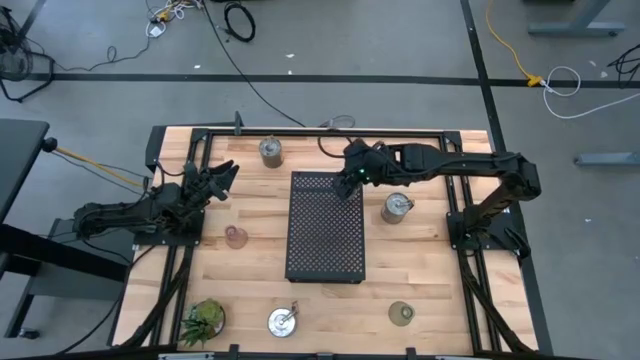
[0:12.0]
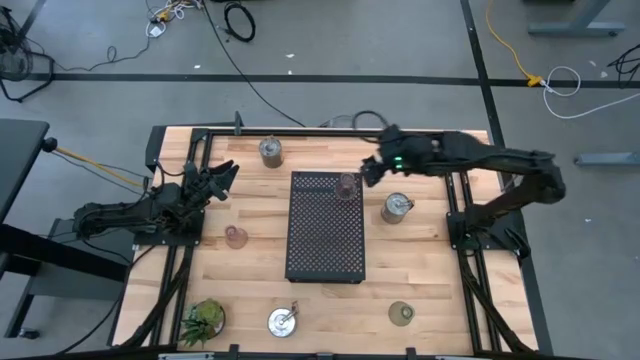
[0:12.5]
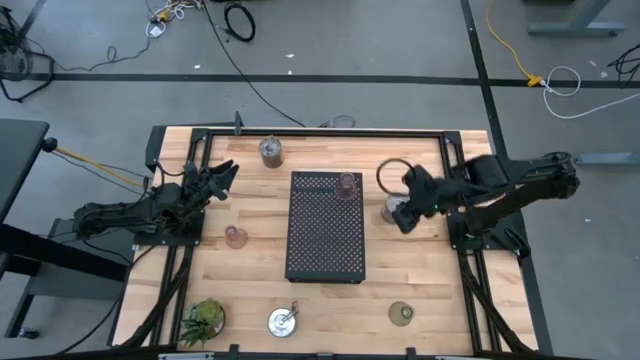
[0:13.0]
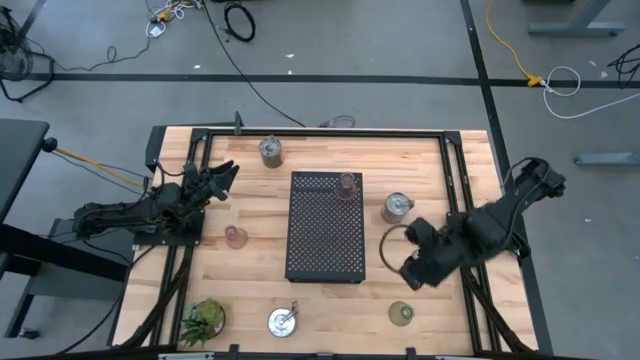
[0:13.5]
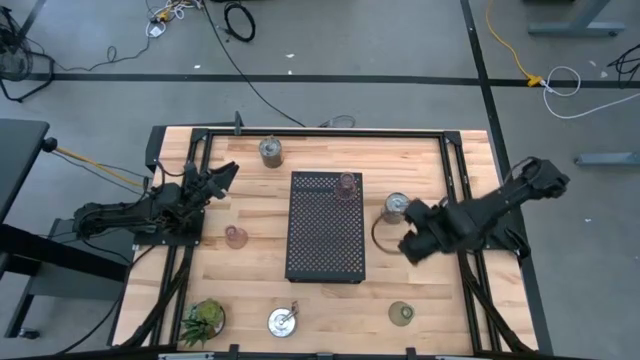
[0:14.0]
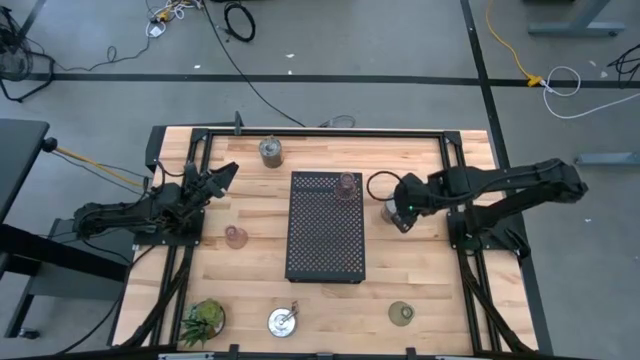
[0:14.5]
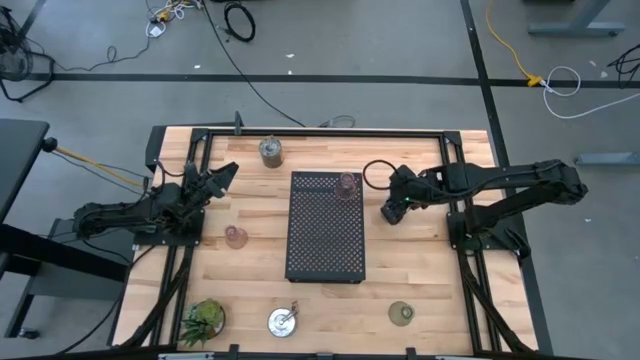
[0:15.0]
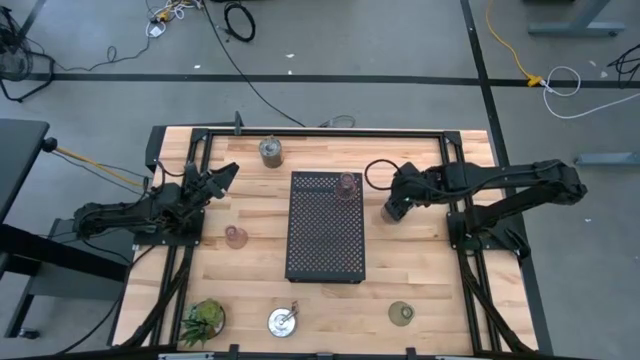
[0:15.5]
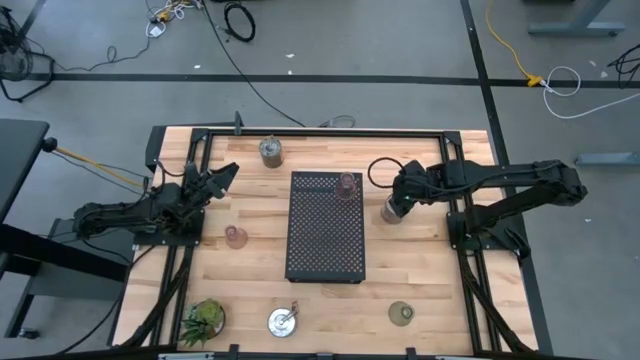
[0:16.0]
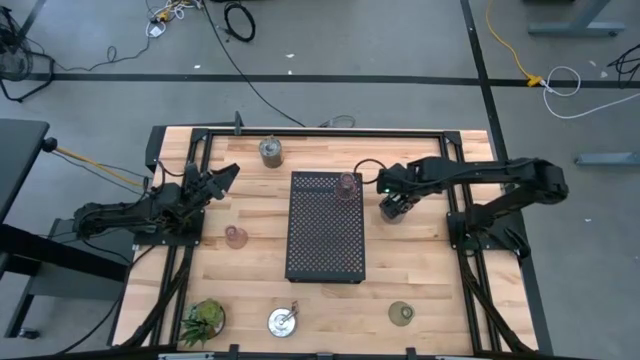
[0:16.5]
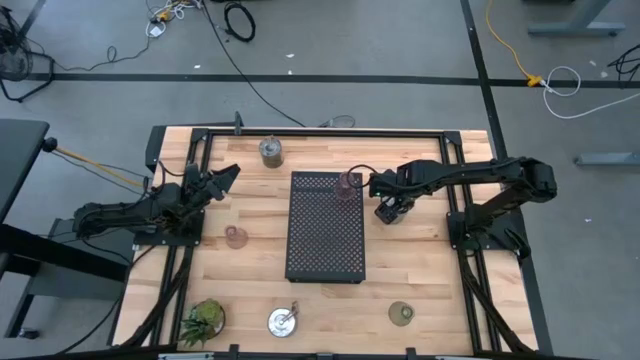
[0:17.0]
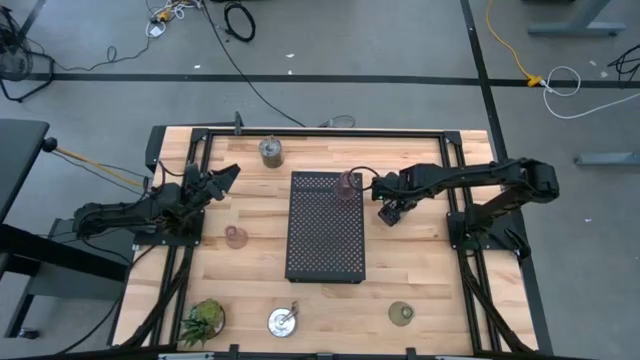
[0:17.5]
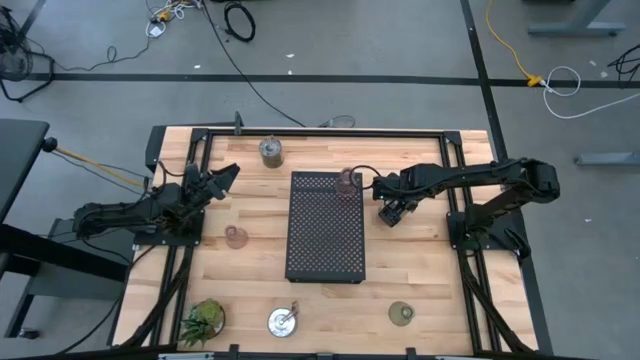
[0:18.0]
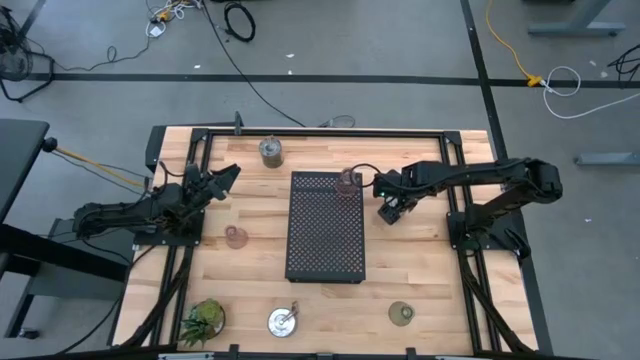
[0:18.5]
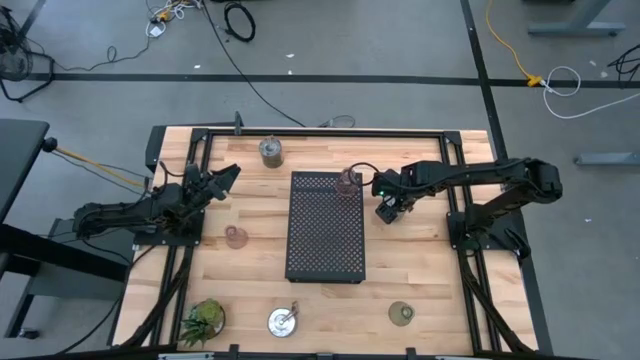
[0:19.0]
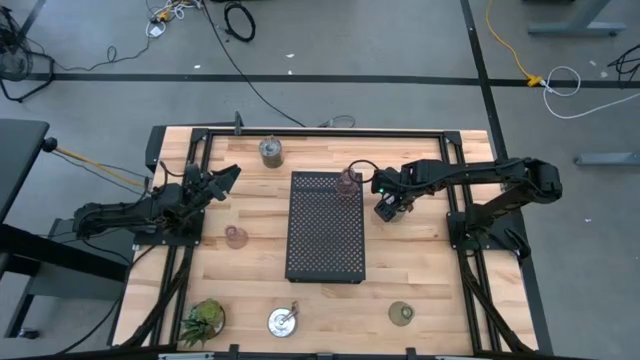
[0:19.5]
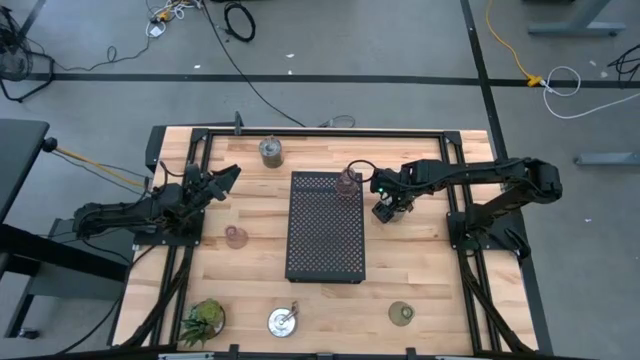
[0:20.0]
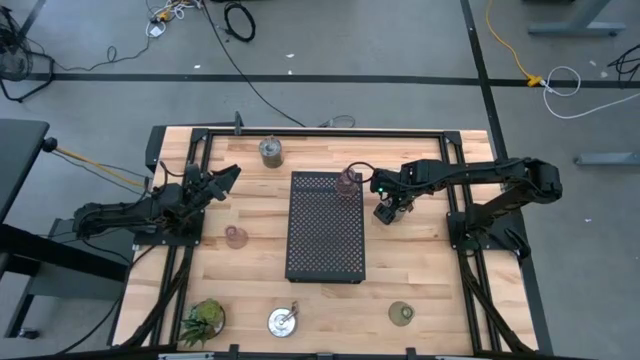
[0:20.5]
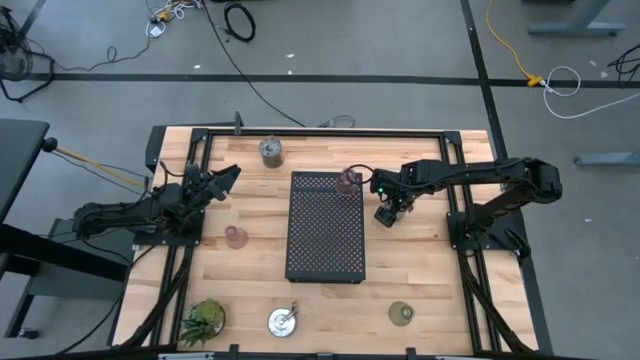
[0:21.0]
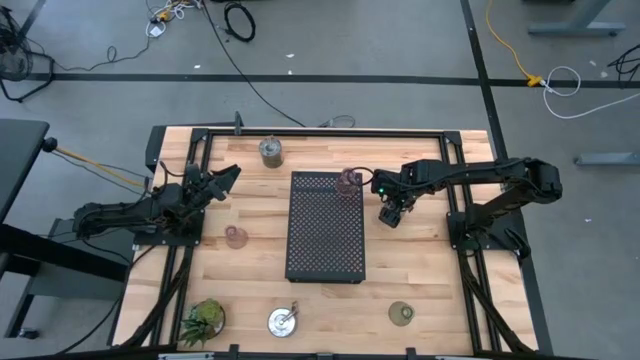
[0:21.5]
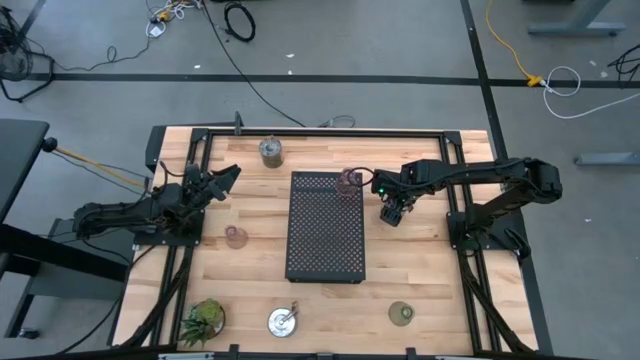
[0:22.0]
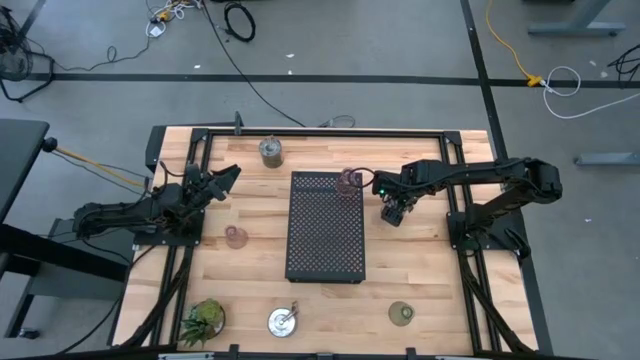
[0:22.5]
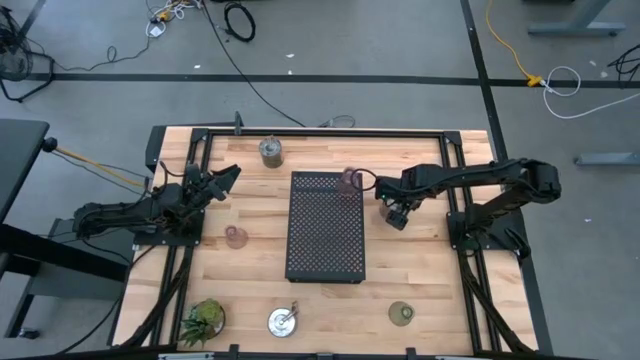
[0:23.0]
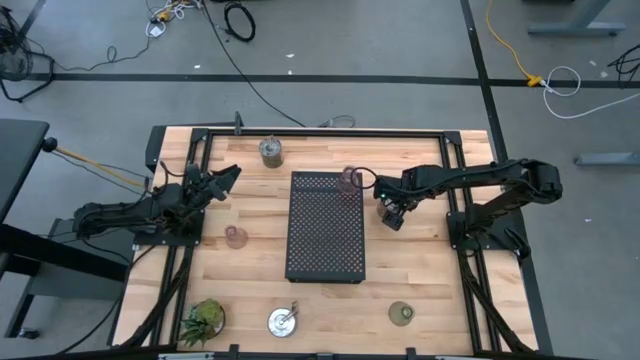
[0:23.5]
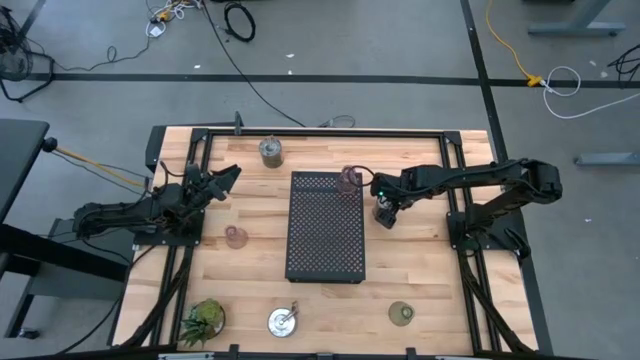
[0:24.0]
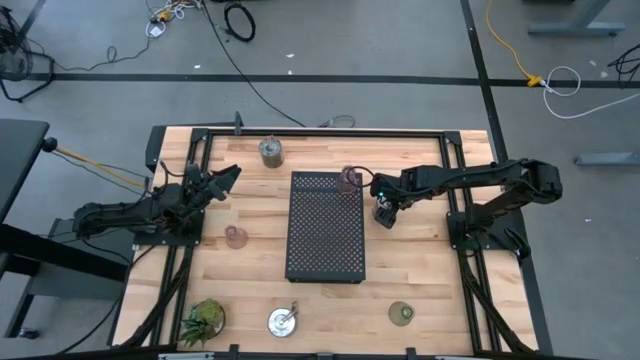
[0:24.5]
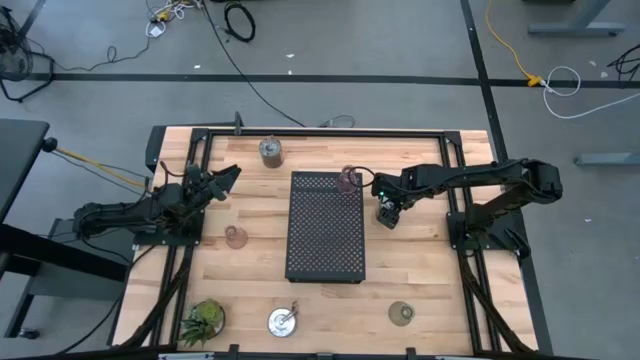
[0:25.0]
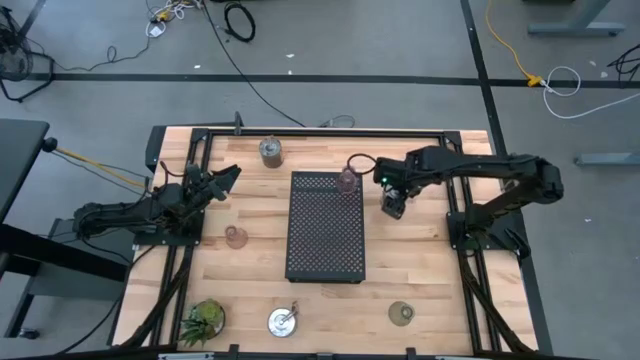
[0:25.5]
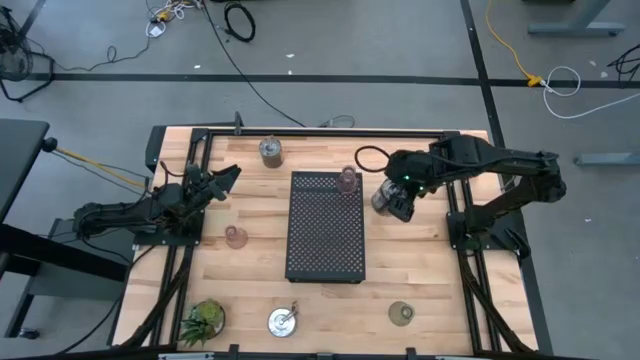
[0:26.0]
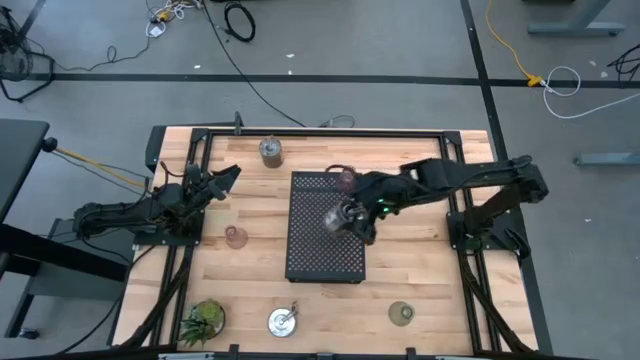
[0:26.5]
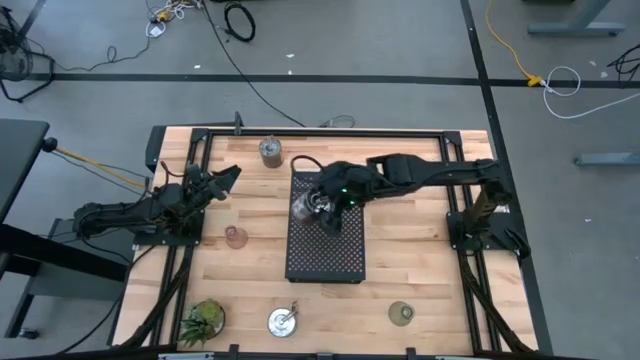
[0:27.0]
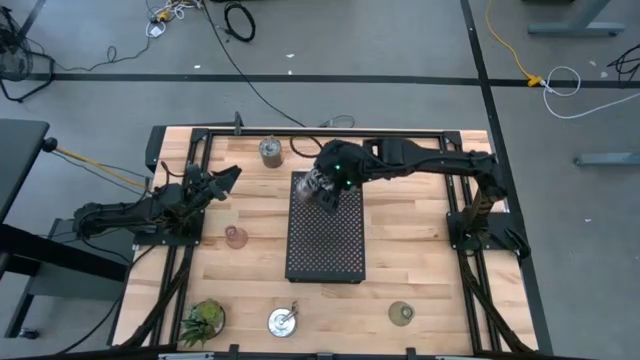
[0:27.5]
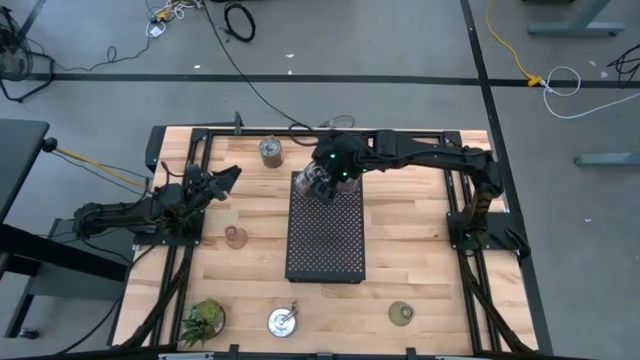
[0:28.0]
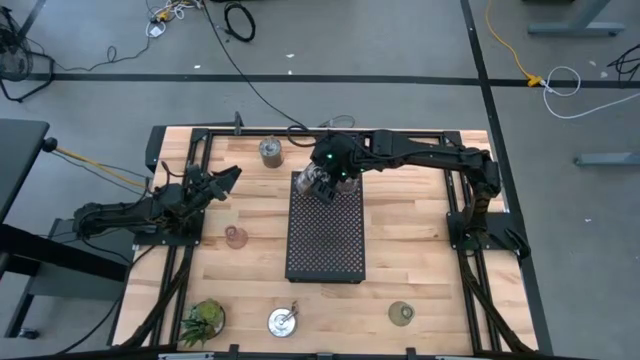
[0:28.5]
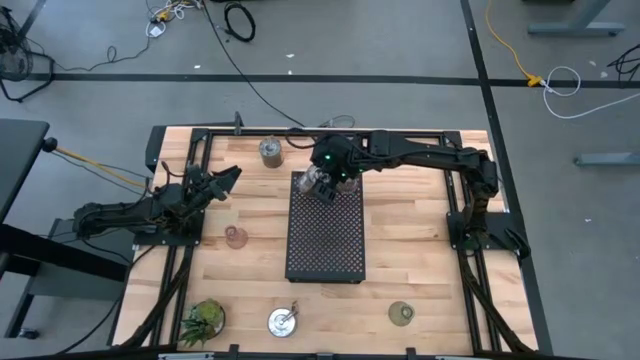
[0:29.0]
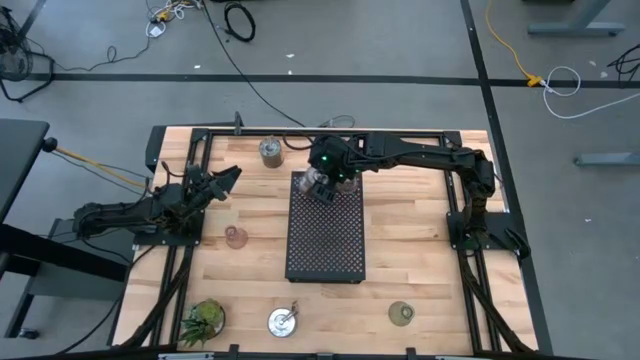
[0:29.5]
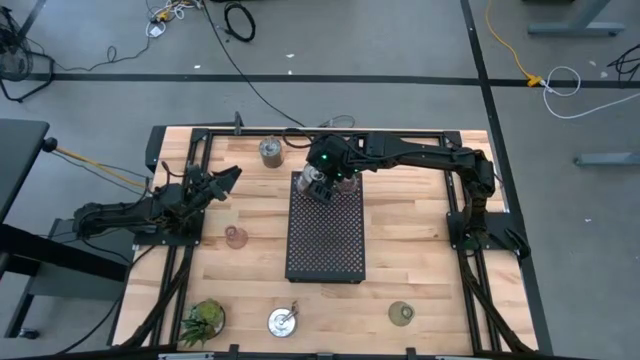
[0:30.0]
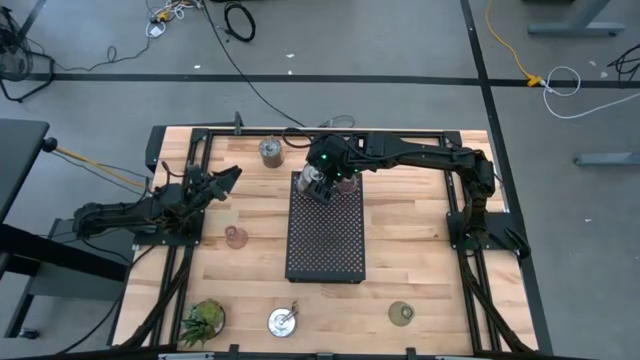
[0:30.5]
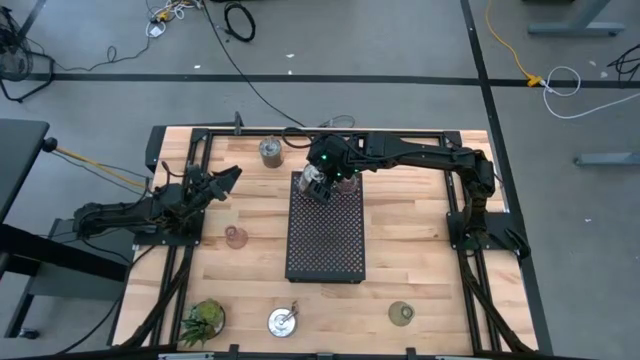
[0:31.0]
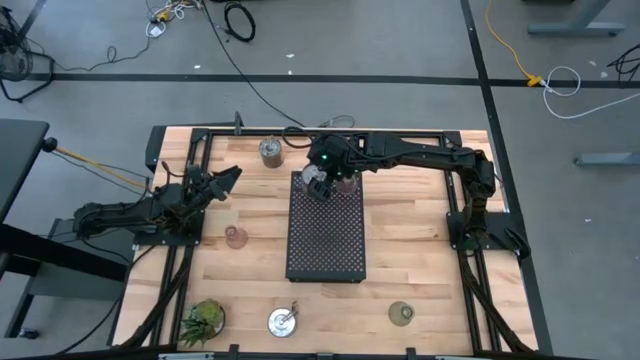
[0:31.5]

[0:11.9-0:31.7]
Task: Pick & Place candle stick holders
Put the middle right silver scented candle on the shelf

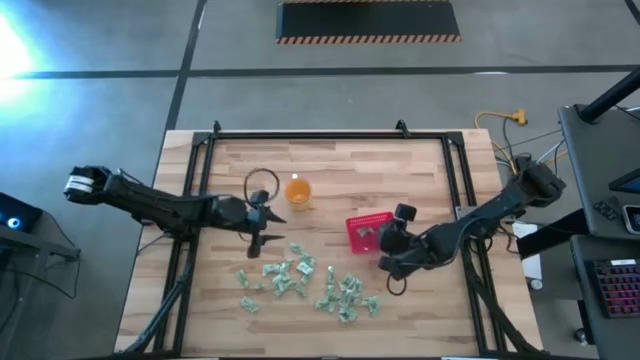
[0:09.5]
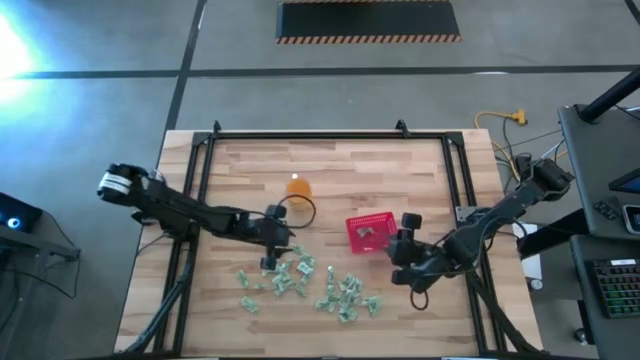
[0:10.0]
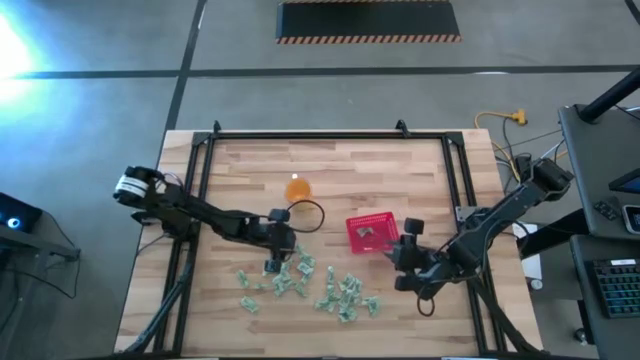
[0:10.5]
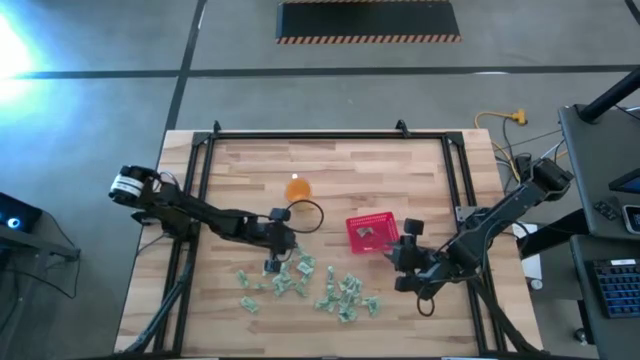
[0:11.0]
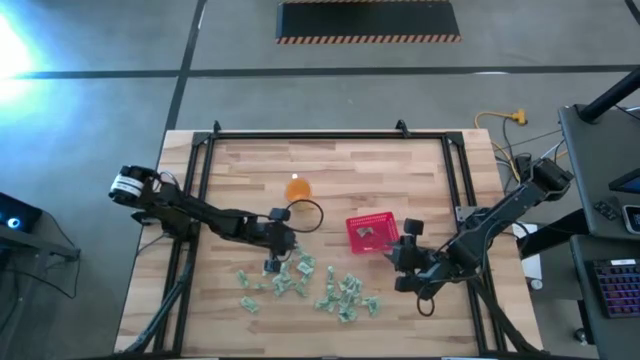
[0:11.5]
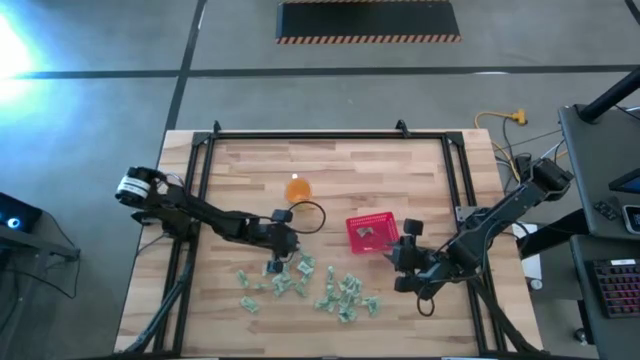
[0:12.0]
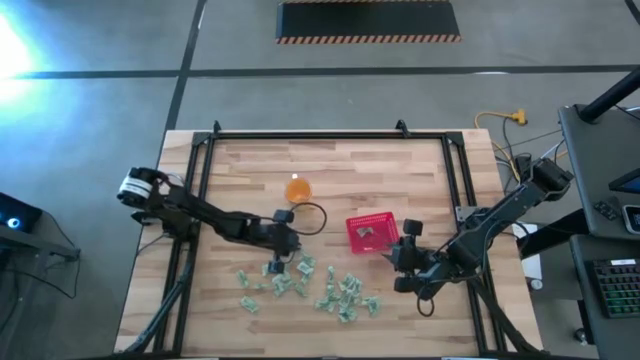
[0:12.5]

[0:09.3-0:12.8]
Task: Pick and place Stevia / Truvia into bins
Put the stevia packet into the basket
